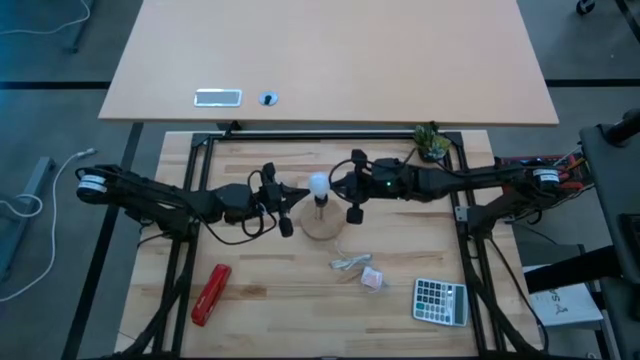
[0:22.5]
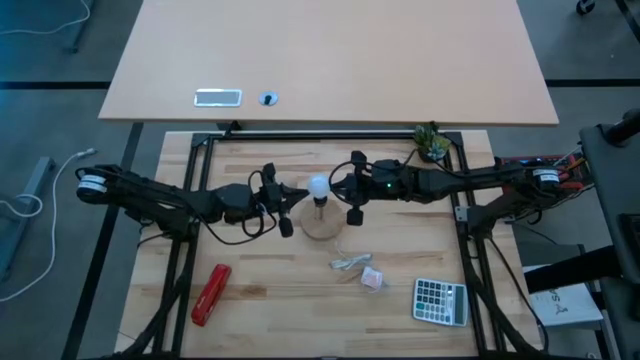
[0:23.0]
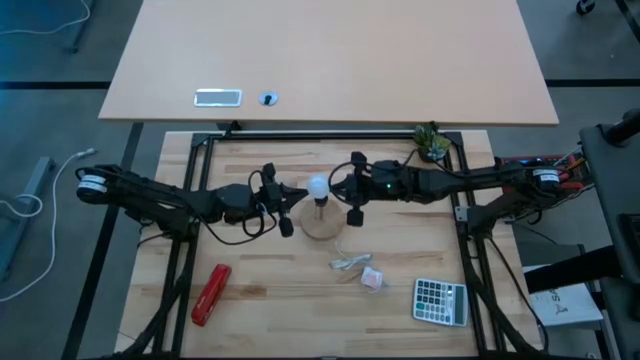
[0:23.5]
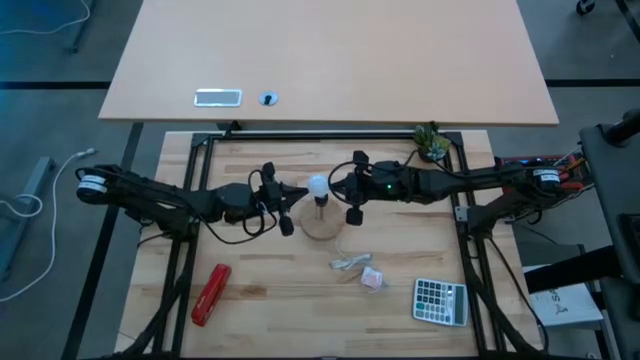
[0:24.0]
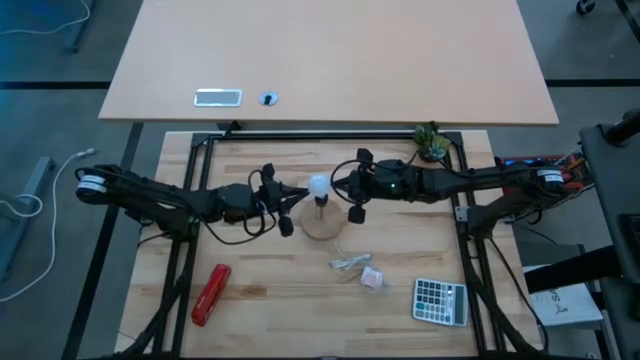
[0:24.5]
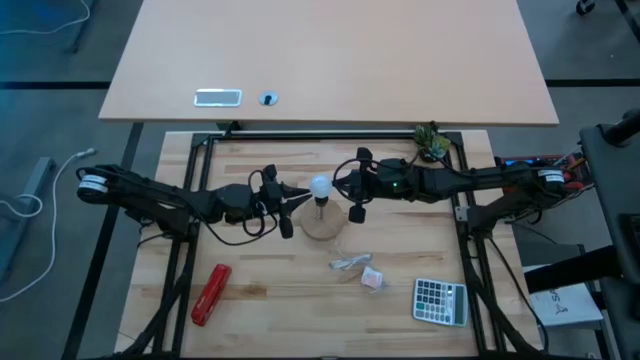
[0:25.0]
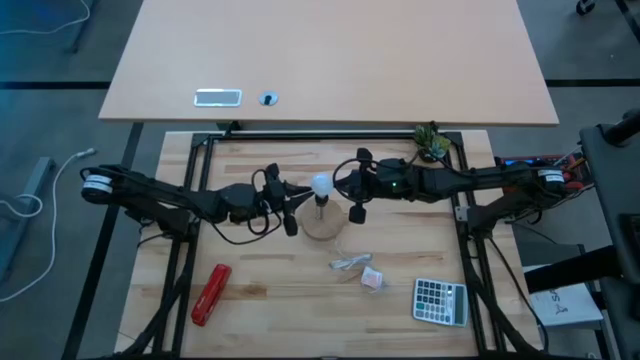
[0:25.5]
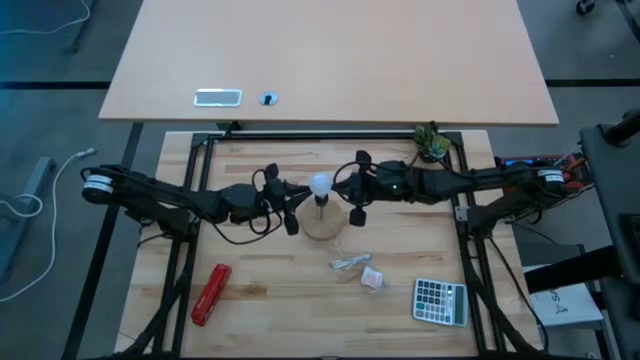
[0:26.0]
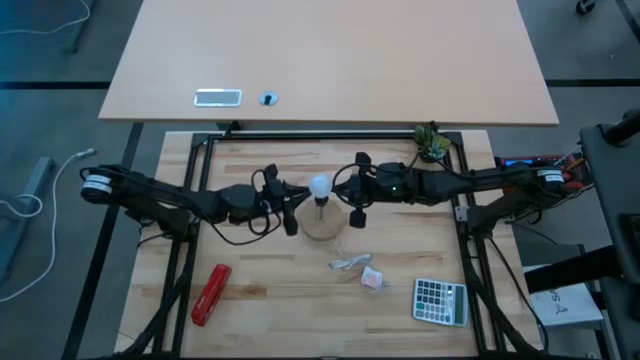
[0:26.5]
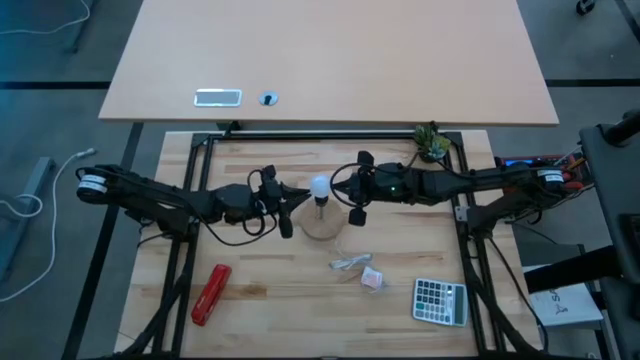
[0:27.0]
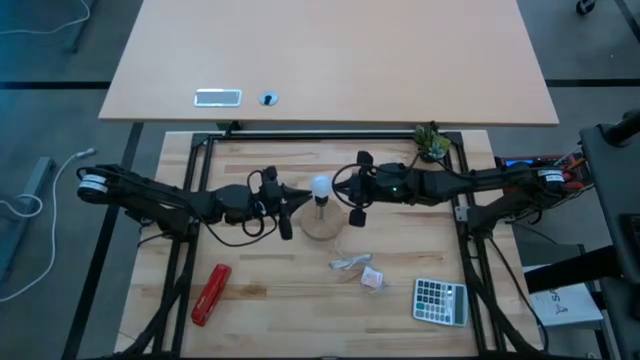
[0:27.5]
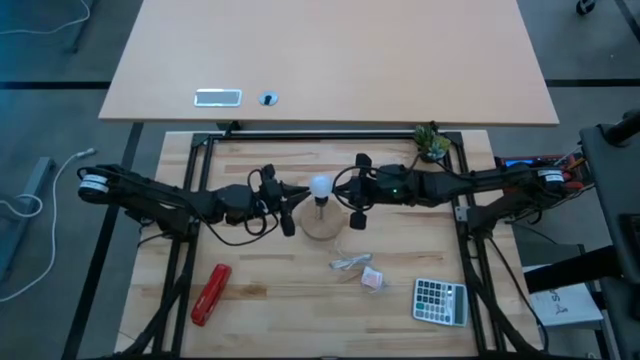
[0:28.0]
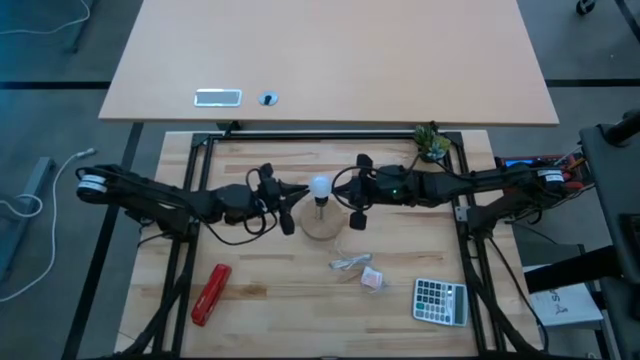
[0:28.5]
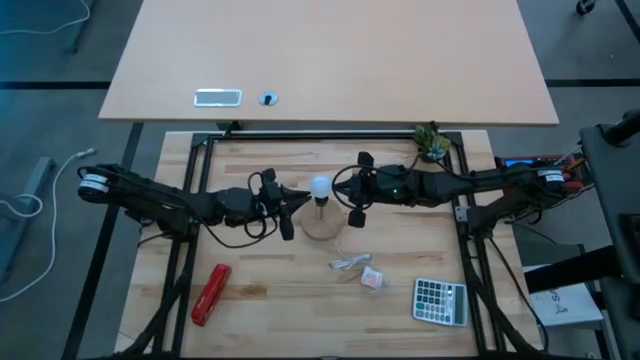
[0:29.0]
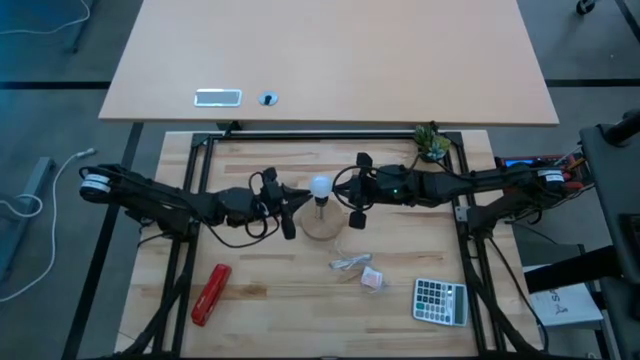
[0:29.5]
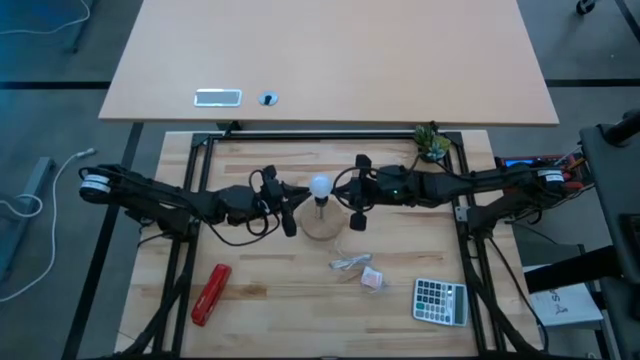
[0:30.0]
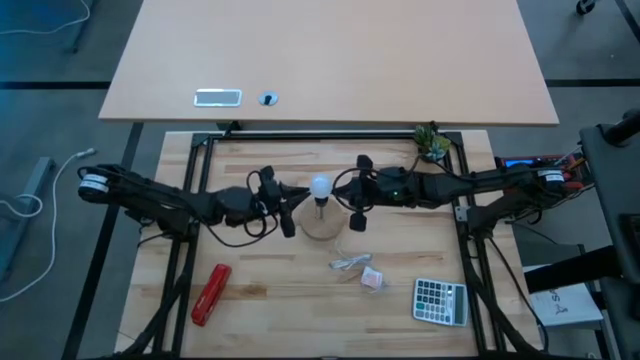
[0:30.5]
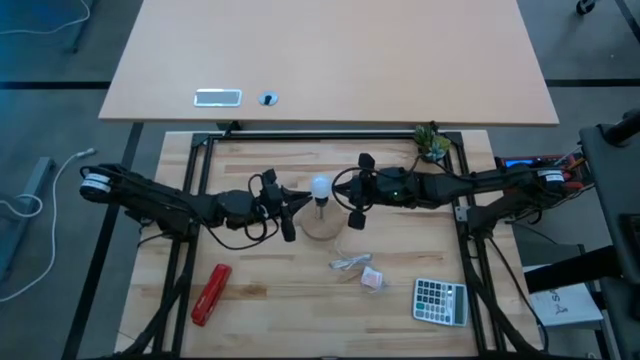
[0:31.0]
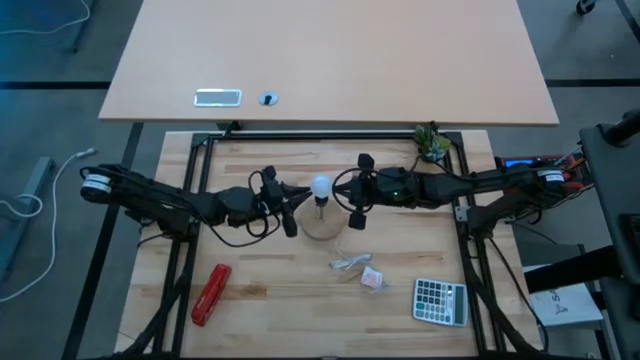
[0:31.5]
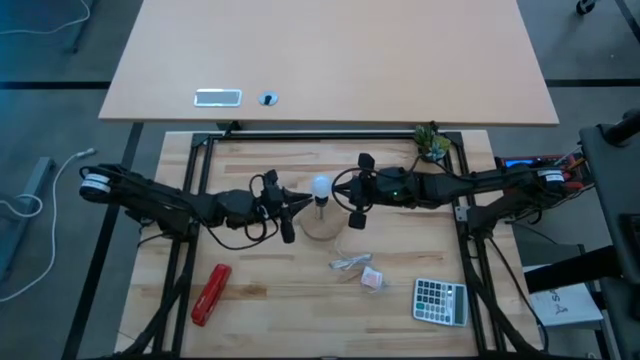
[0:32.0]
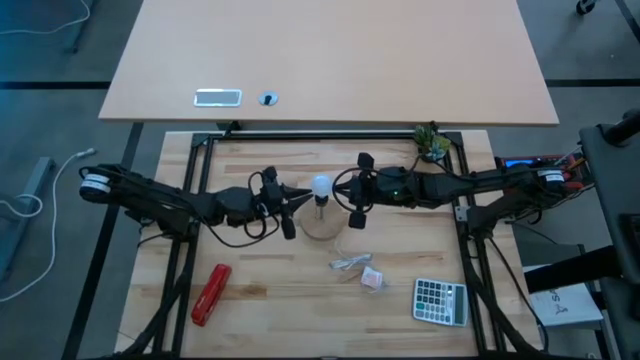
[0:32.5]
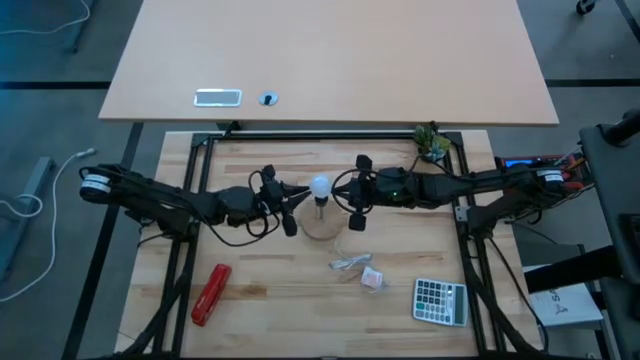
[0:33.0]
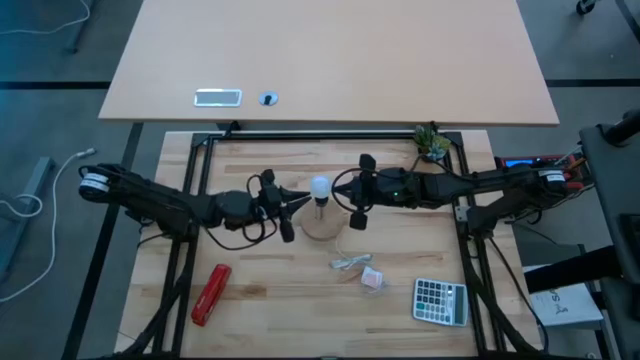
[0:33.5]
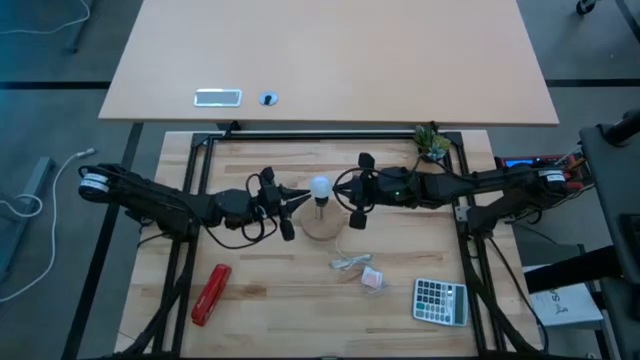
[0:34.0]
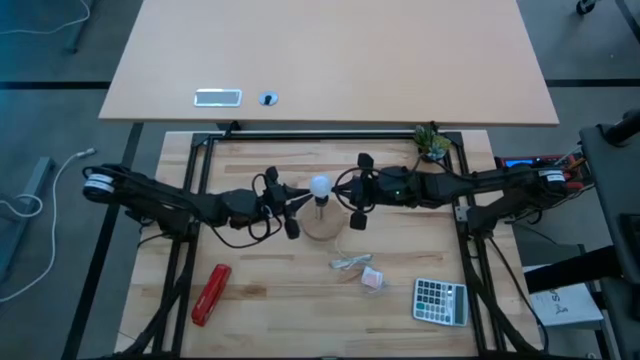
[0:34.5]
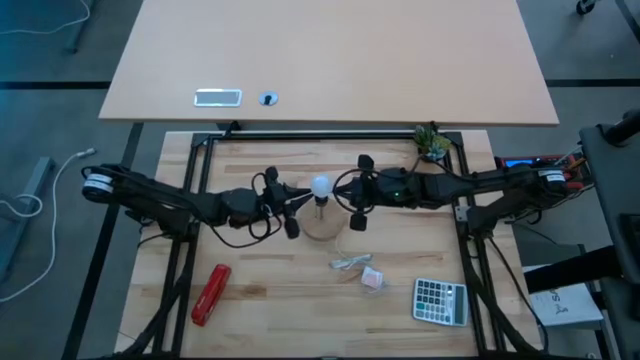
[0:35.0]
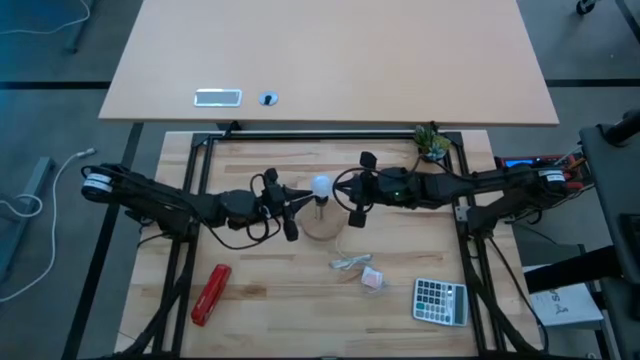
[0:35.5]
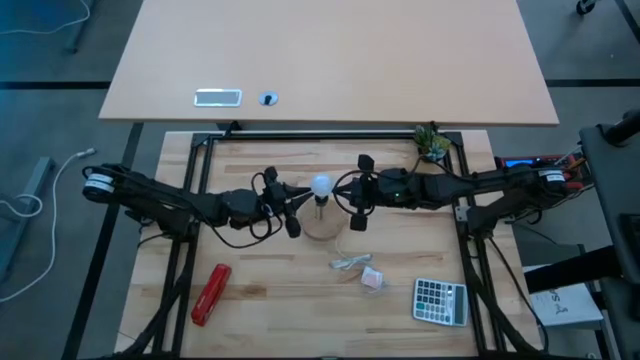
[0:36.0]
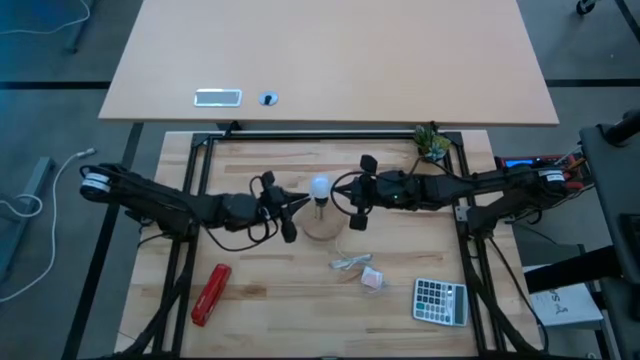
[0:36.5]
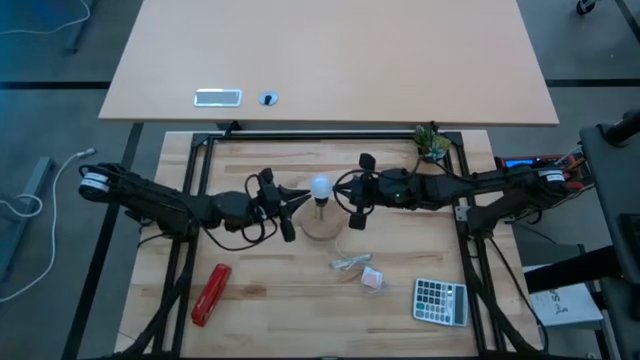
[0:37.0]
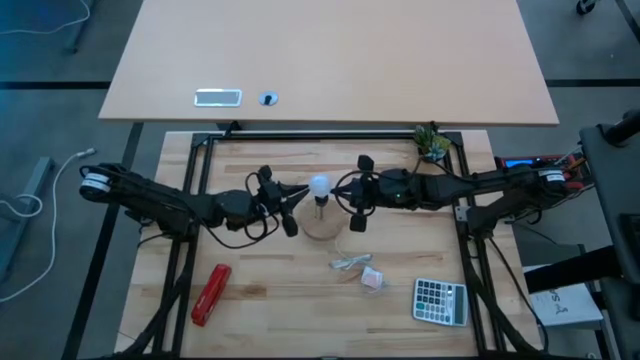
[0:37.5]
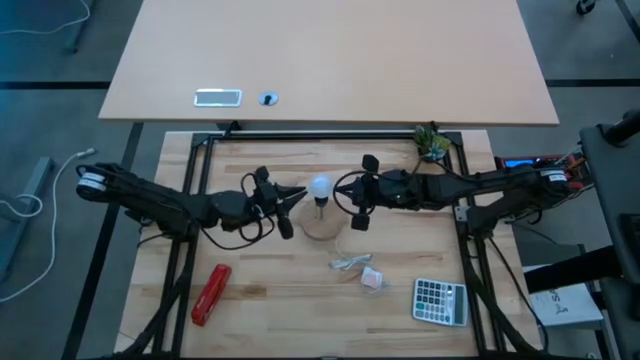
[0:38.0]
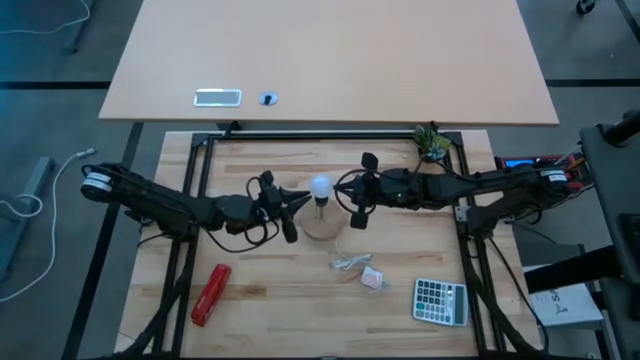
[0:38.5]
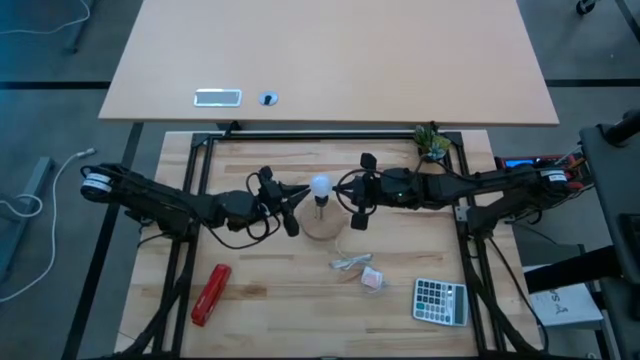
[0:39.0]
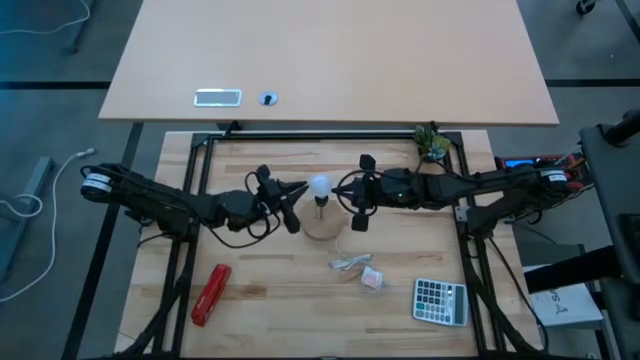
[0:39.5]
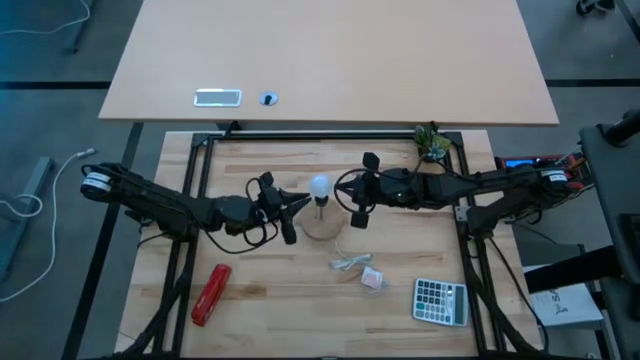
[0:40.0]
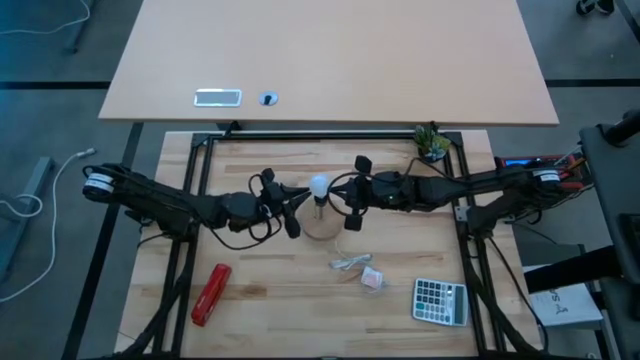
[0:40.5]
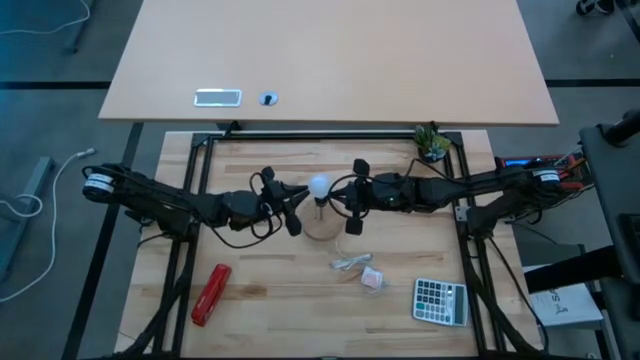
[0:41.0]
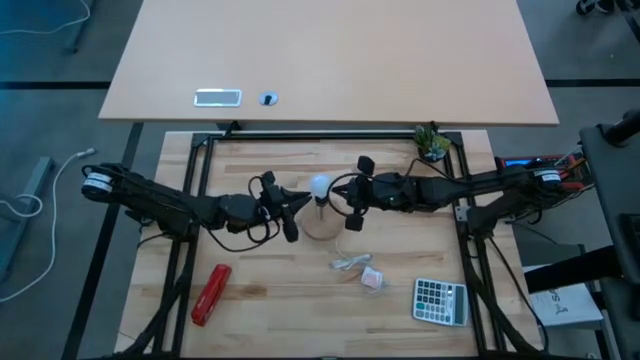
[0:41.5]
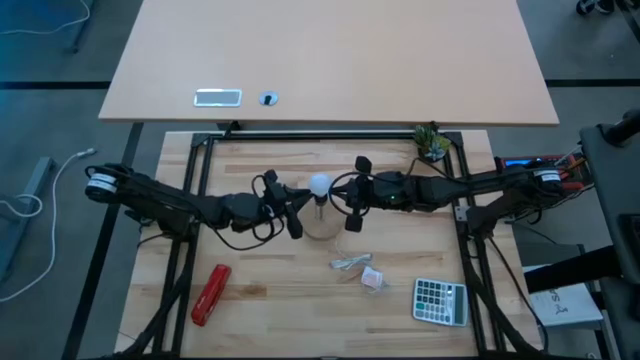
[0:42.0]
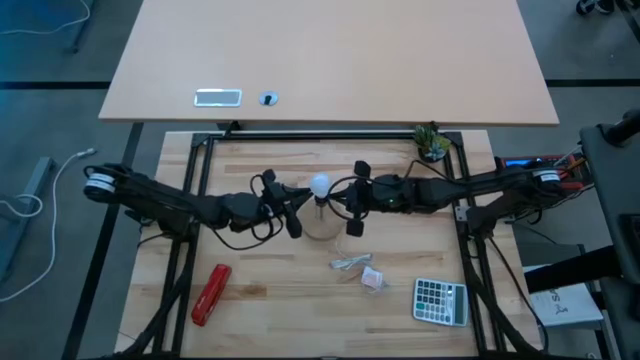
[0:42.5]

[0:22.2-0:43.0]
Task: Screw lightbulb
Insert the lightbulb into the lamp
